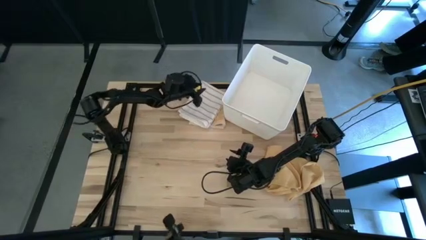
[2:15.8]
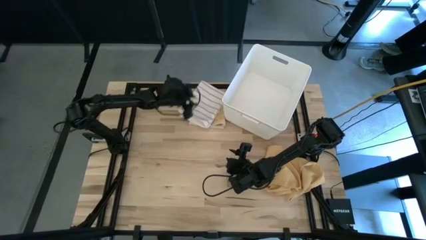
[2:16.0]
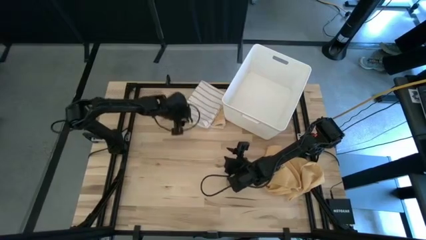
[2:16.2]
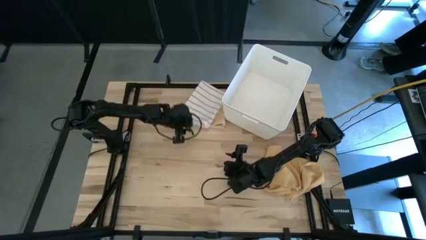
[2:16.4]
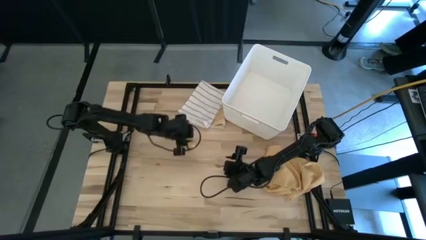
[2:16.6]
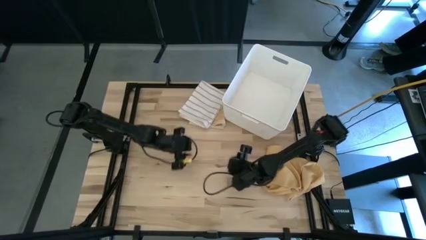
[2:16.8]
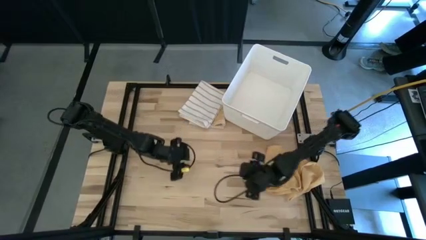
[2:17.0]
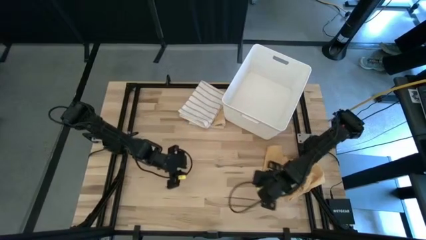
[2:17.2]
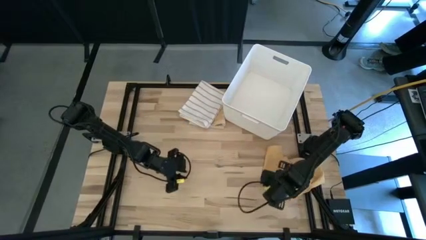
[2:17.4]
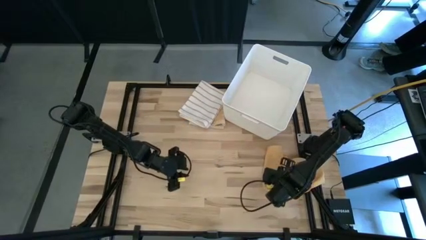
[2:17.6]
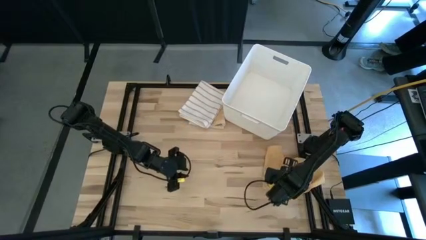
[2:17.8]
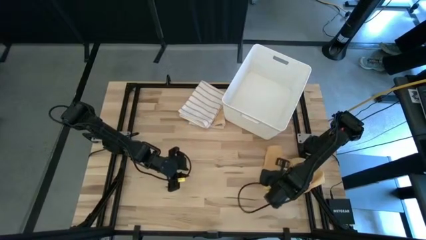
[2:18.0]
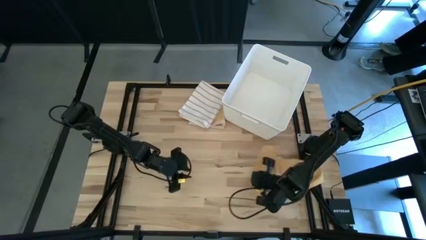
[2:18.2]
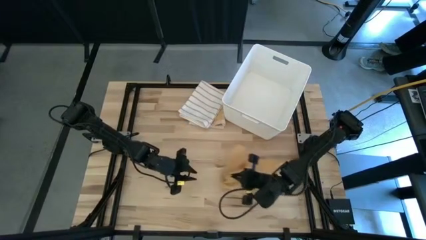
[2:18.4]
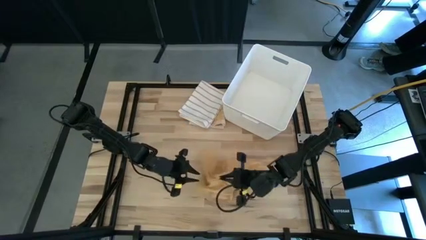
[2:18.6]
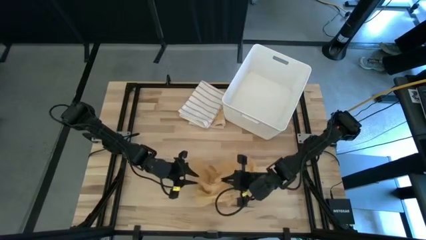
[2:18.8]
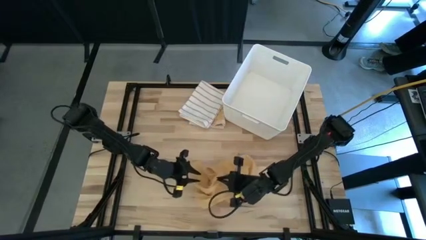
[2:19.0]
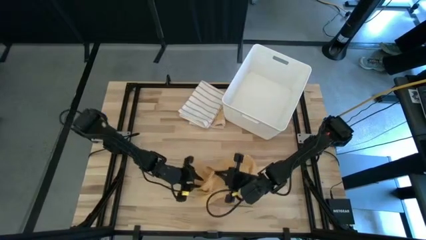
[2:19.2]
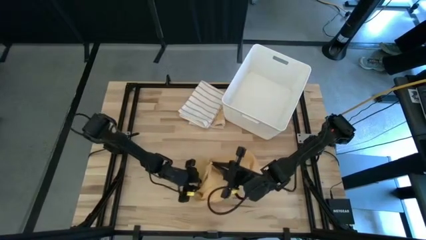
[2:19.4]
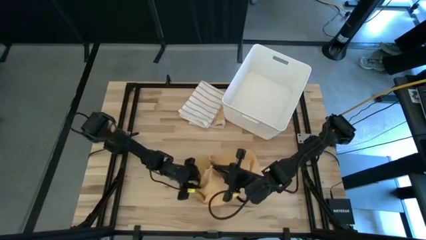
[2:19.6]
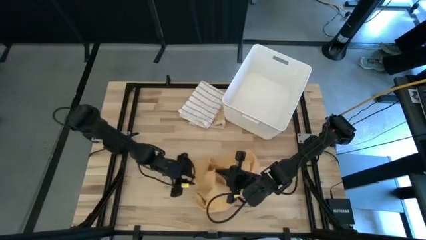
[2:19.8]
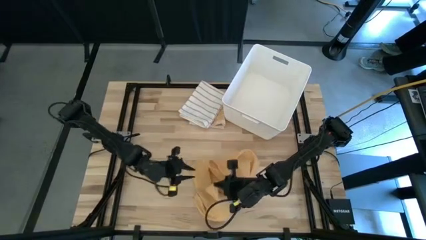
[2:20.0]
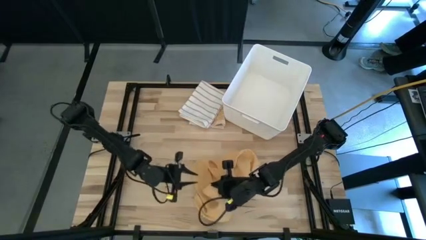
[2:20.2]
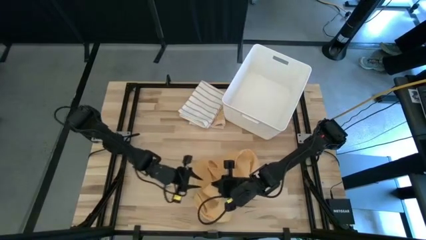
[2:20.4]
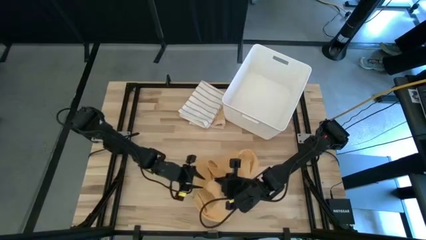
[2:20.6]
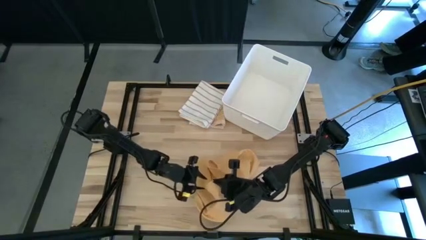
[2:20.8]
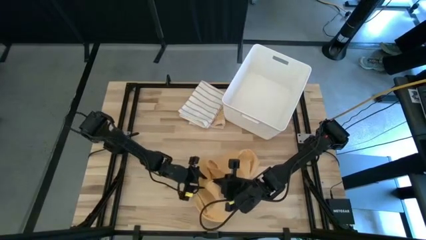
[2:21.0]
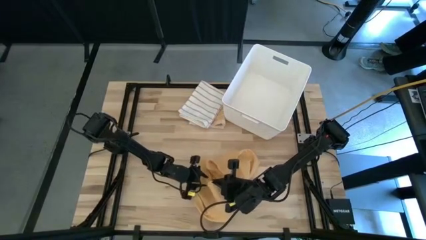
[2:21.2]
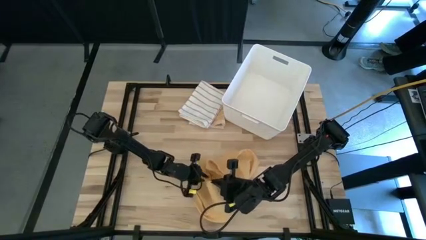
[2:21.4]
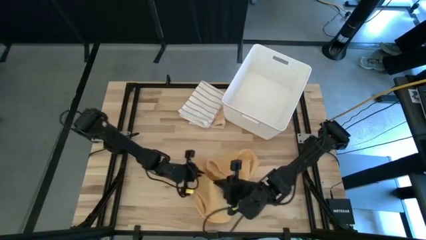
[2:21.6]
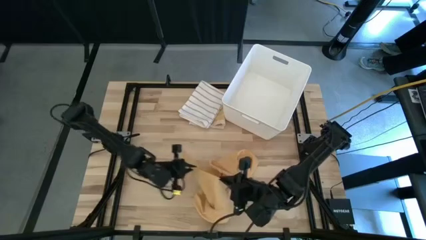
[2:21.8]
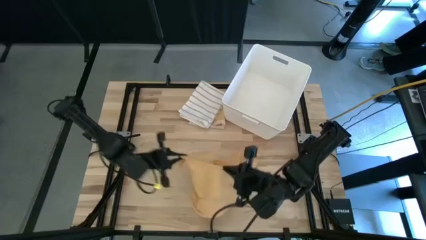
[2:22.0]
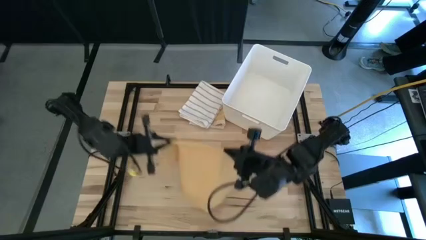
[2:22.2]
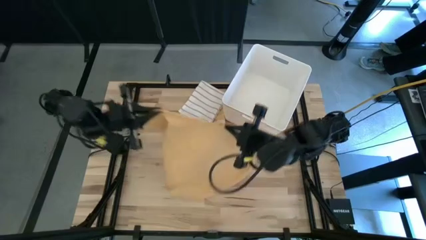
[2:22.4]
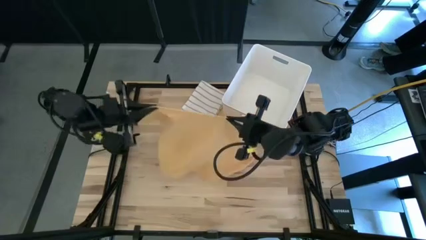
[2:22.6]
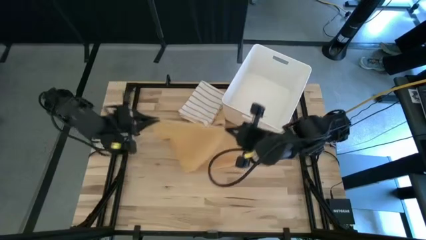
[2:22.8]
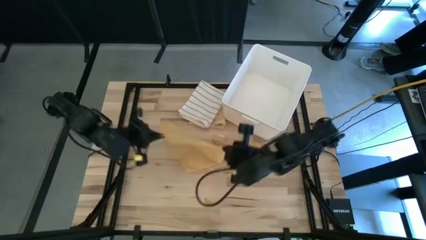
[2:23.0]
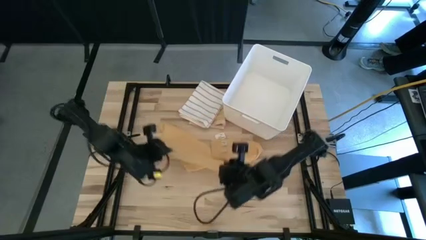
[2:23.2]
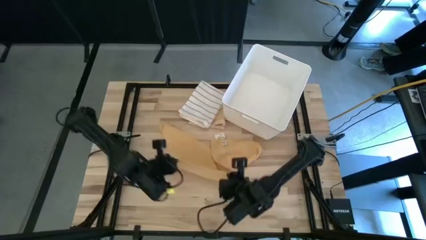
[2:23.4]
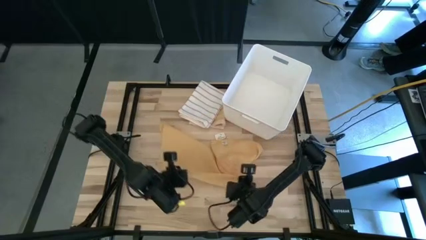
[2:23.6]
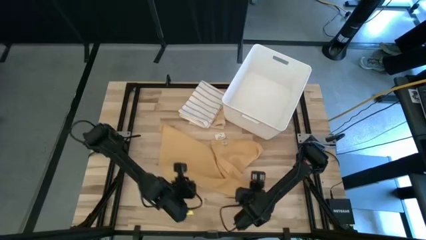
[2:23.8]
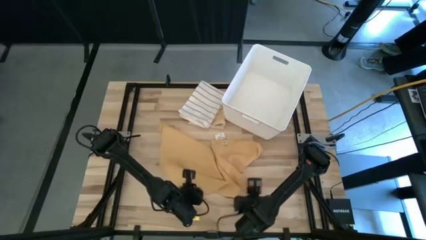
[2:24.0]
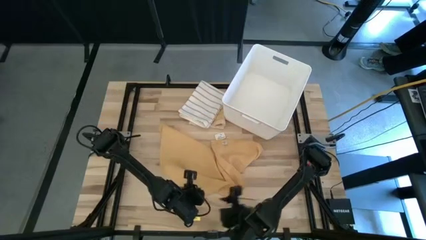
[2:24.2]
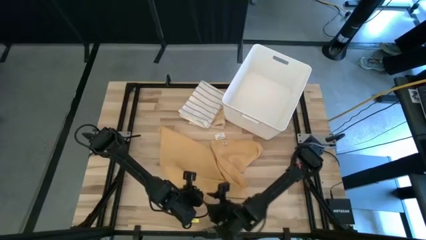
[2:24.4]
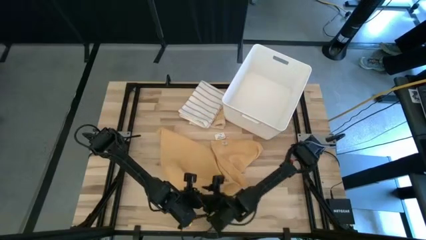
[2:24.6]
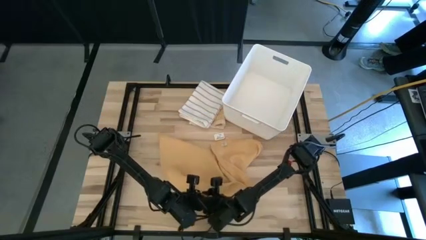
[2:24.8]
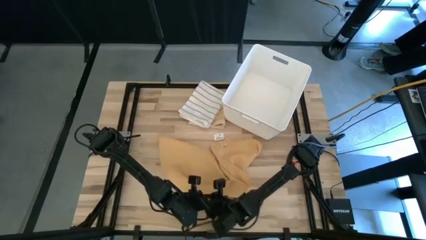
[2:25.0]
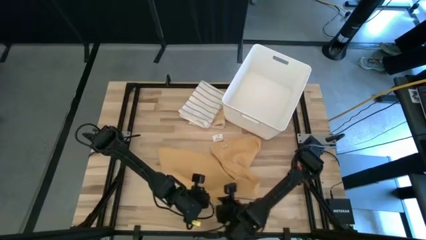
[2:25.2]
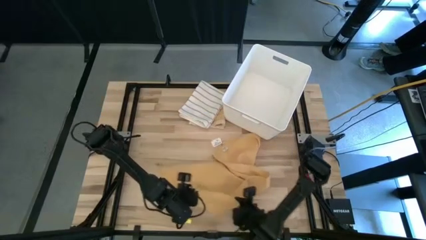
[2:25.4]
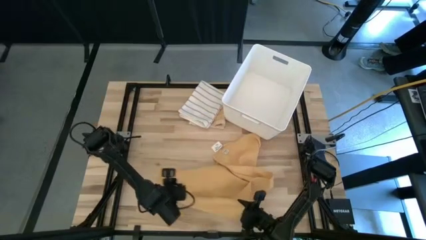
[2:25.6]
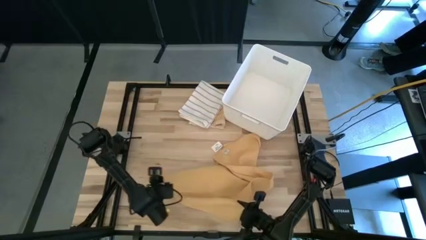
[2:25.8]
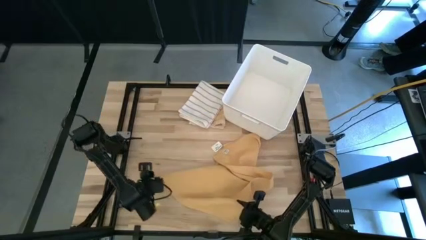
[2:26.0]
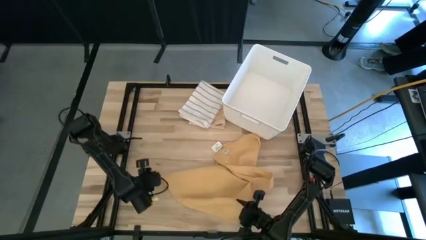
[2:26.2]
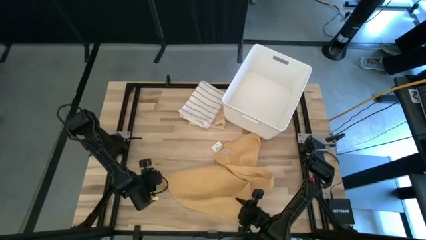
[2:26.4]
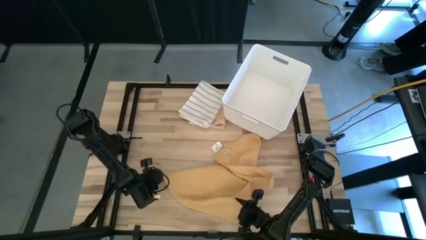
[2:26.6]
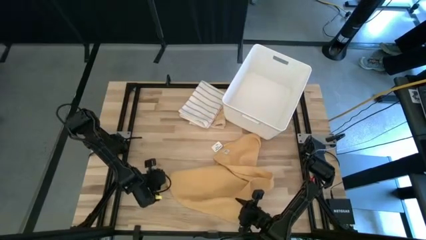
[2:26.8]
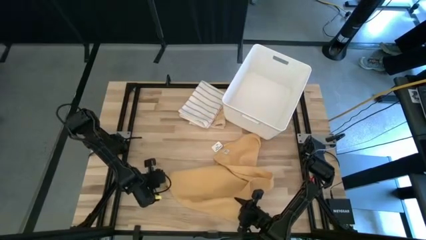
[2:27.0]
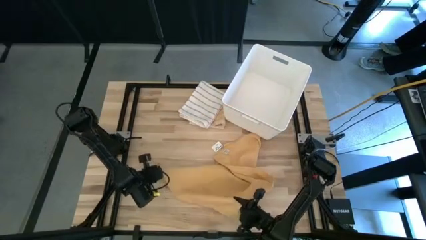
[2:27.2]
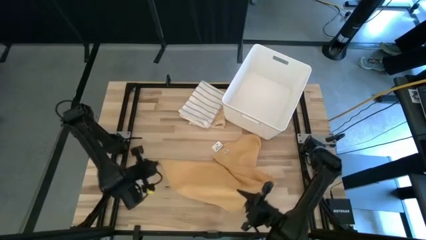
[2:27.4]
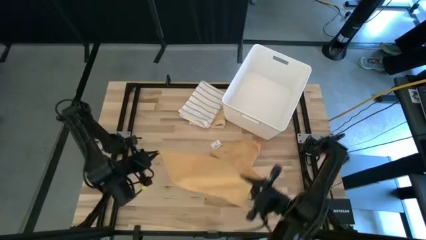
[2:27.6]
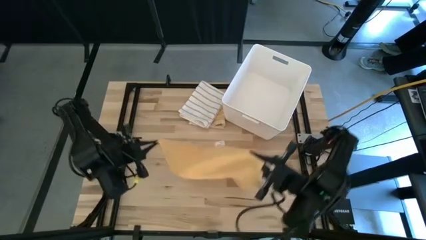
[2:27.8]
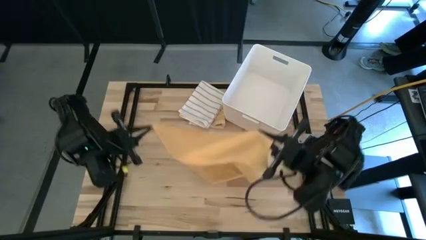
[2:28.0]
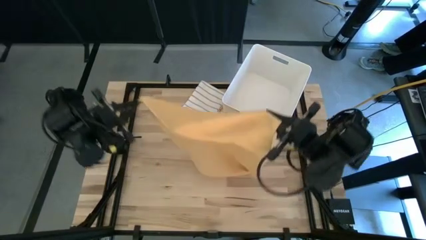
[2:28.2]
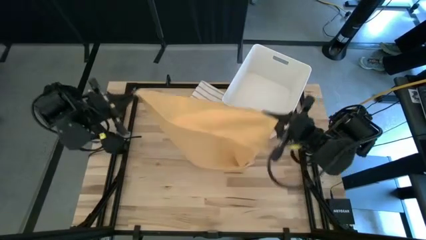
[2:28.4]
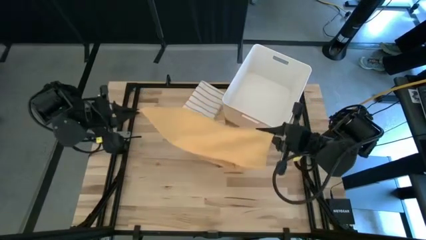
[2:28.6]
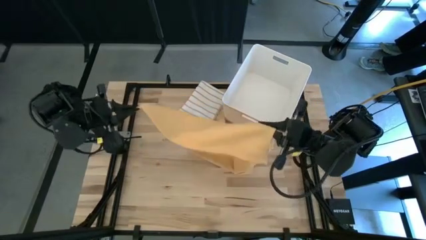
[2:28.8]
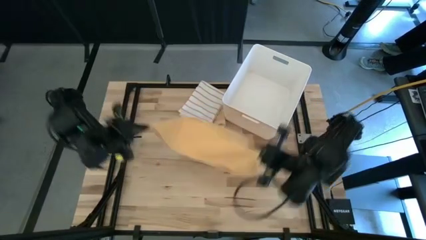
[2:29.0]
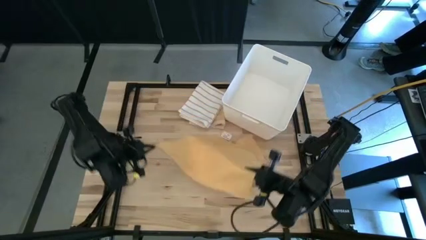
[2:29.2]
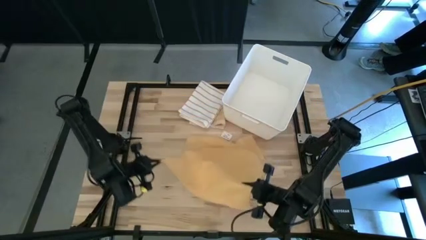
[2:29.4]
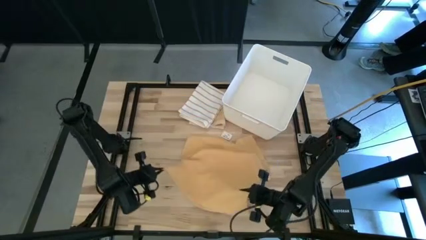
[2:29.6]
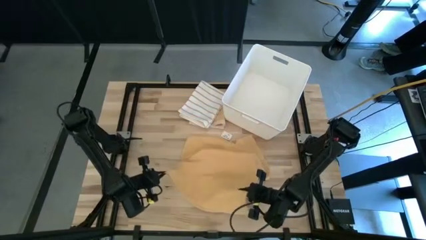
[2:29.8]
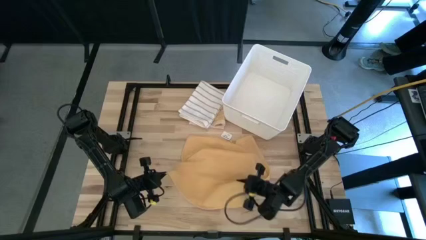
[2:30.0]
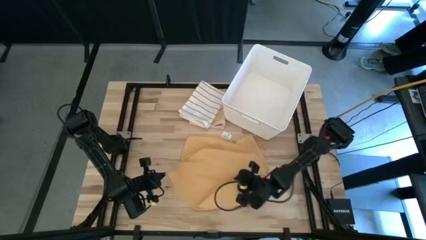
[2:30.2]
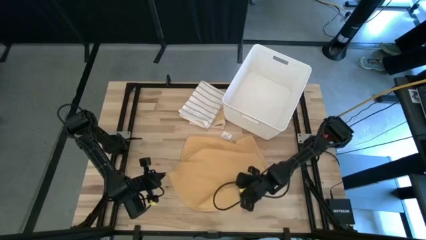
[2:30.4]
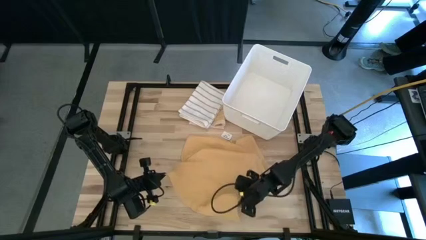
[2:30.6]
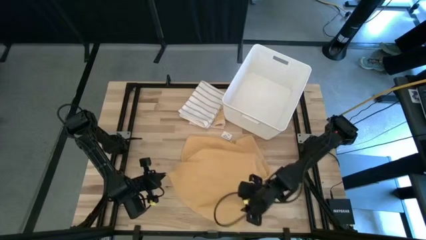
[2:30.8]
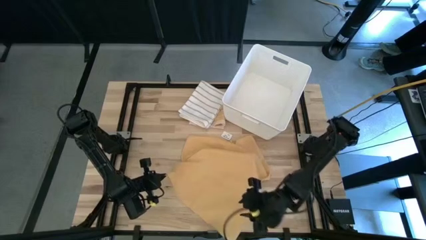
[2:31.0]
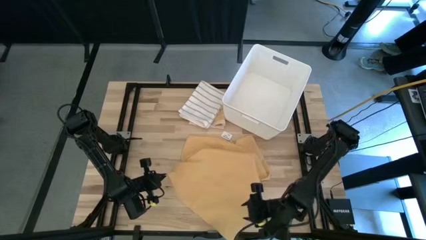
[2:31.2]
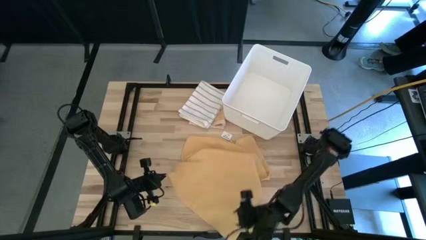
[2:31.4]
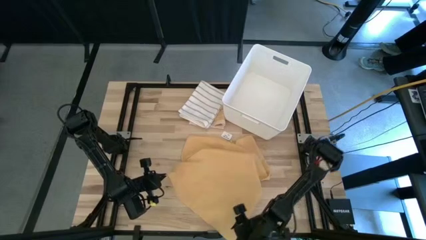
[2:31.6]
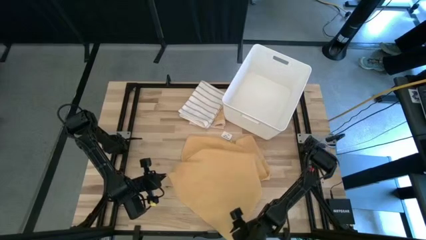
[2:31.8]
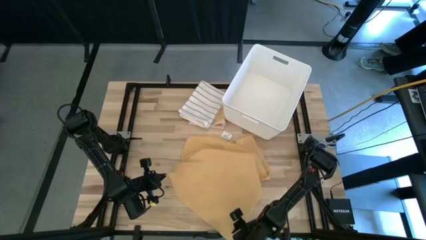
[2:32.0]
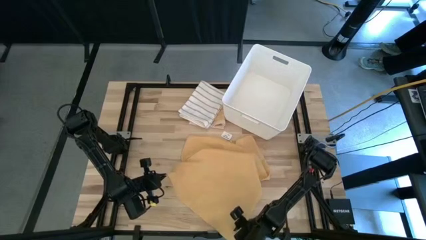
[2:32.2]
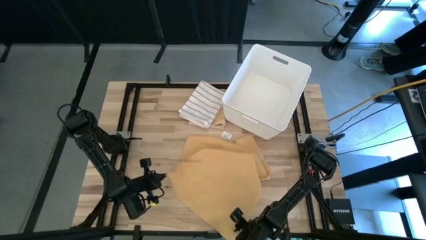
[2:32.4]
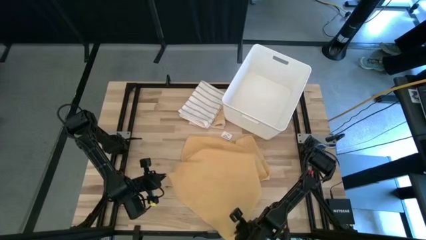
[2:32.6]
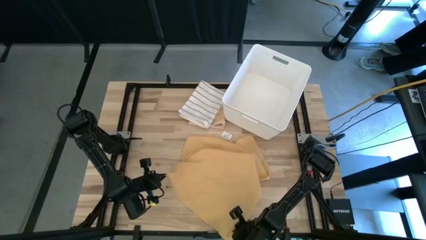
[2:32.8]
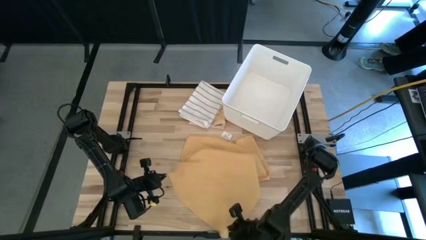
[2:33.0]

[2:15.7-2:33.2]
Task: Fold towel
Fold the yellow towel
